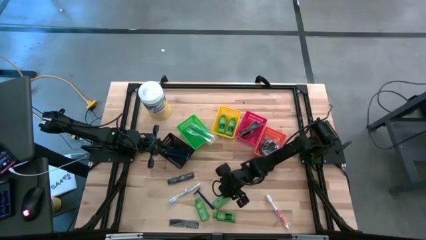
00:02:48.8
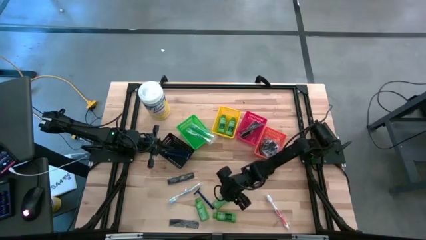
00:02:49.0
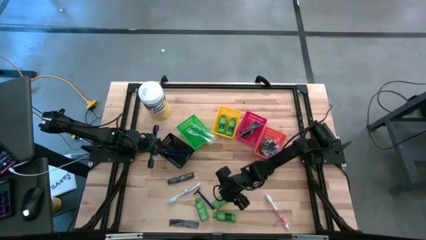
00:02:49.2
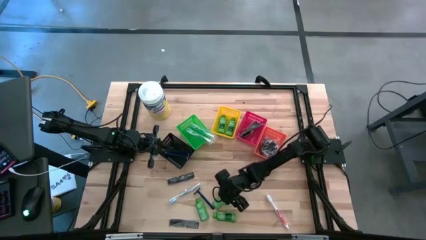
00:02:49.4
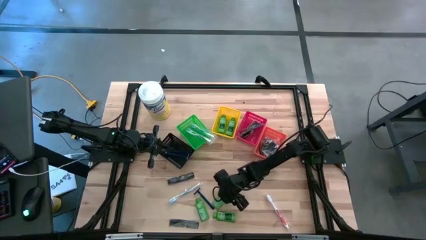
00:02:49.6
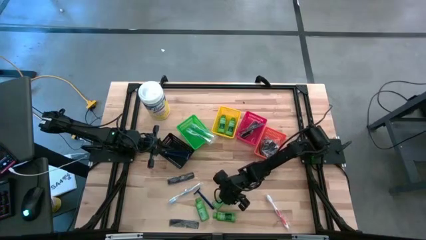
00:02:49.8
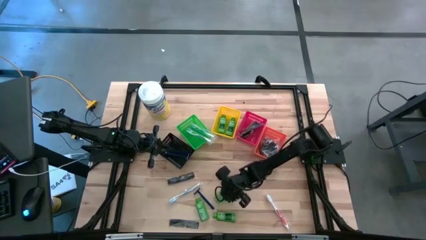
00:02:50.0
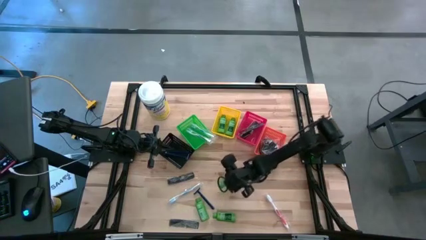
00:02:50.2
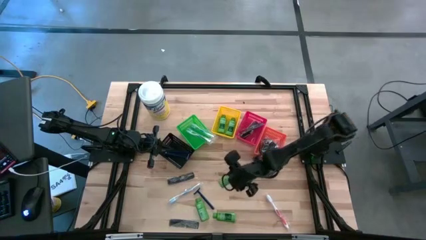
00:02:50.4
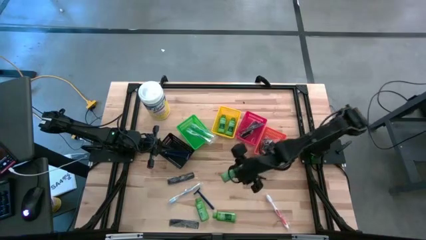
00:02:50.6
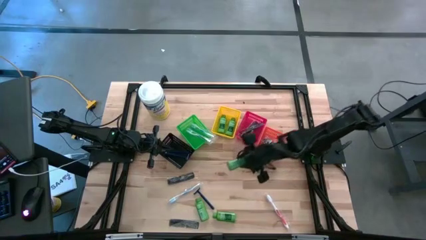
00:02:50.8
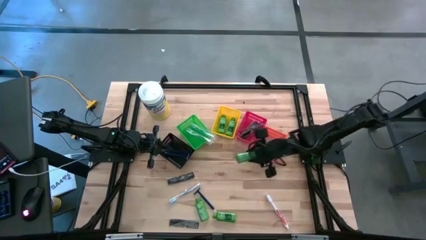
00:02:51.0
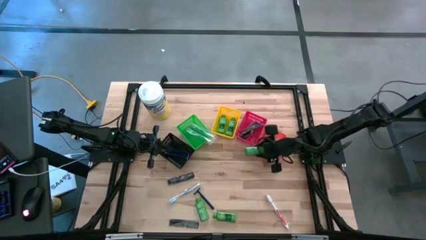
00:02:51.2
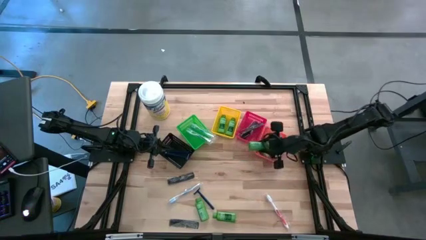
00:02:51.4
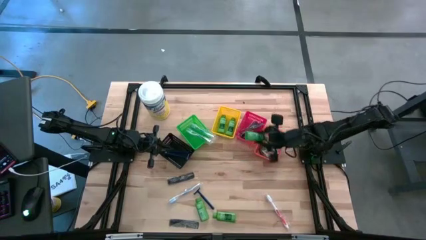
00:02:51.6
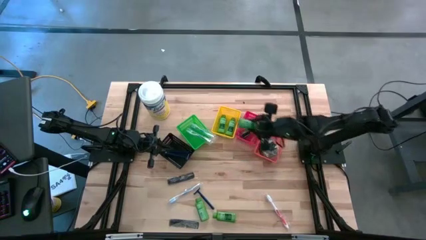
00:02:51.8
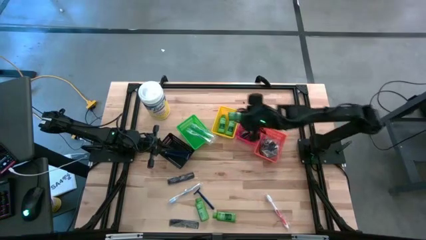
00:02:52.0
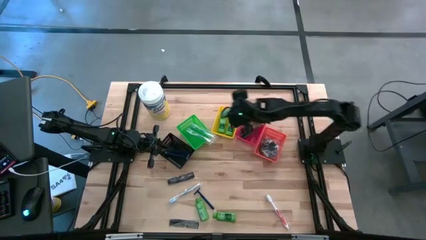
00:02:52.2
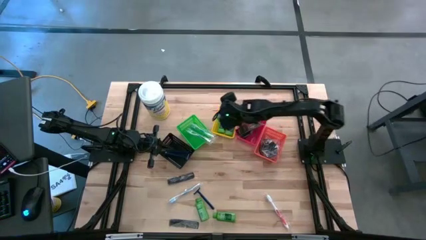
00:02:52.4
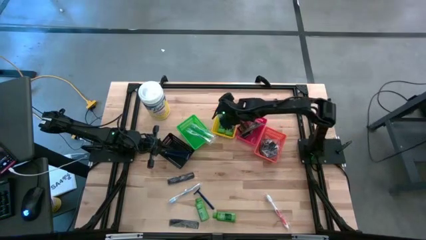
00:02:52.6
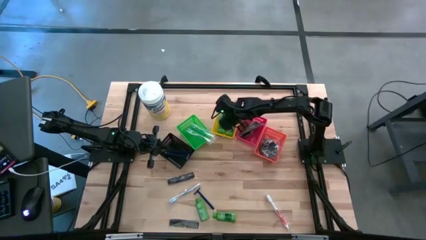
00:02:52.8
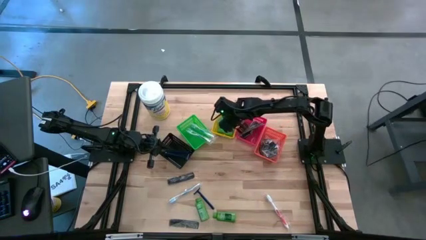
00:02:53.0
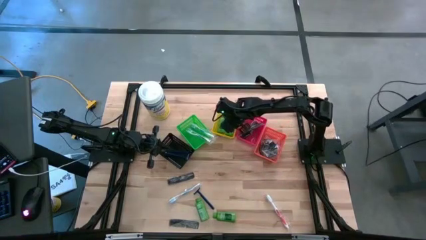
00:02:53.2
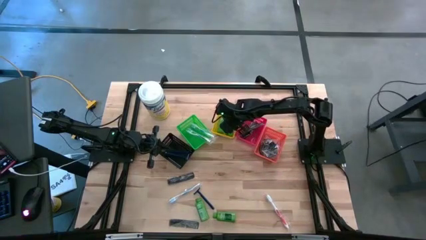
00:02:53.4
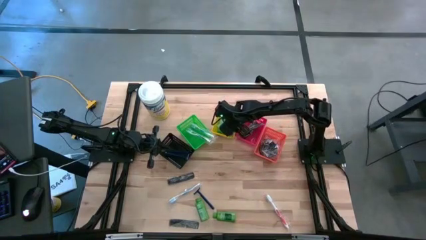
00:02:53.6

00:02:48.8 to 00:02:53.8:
Task: Pick & Place Travel size toiletries
Put the green shampoo into the yellow bin

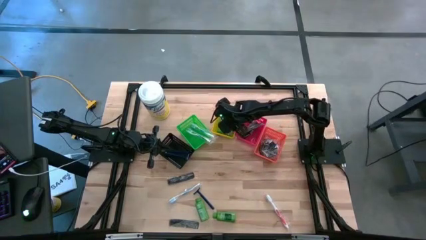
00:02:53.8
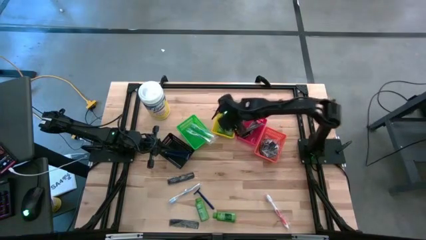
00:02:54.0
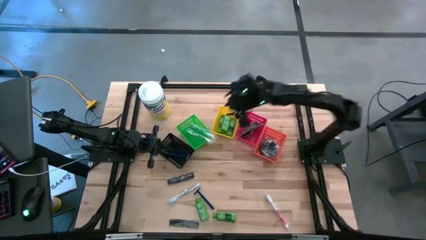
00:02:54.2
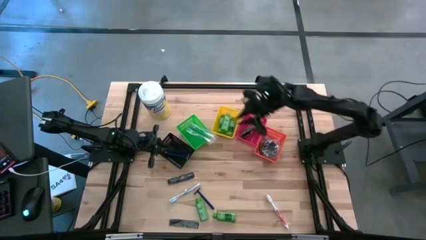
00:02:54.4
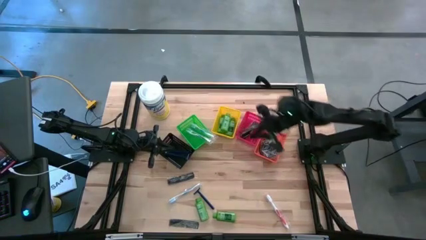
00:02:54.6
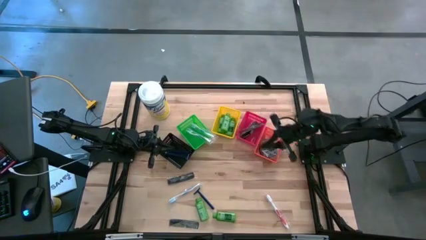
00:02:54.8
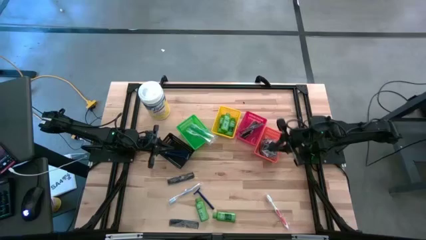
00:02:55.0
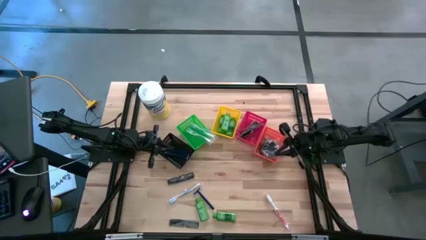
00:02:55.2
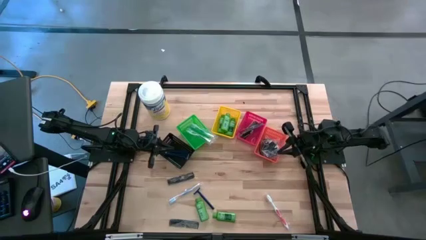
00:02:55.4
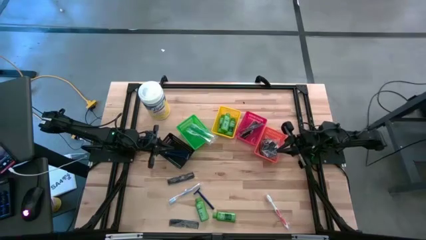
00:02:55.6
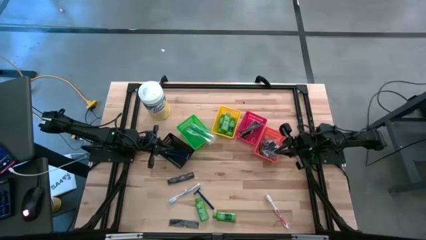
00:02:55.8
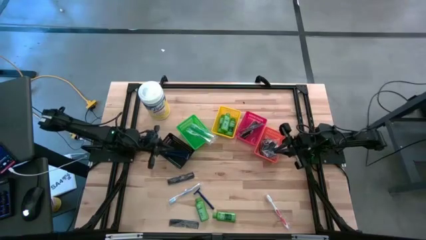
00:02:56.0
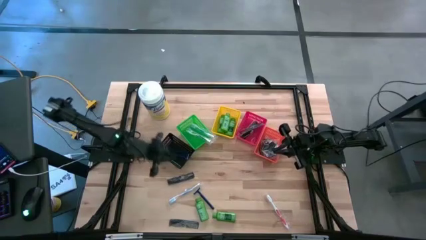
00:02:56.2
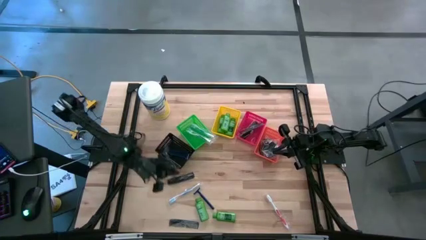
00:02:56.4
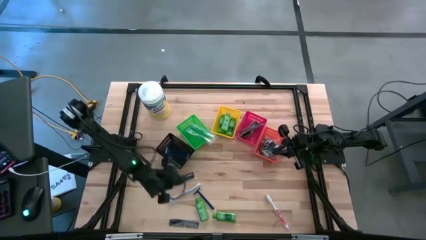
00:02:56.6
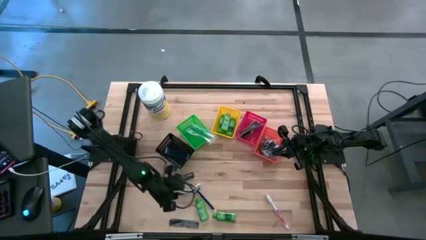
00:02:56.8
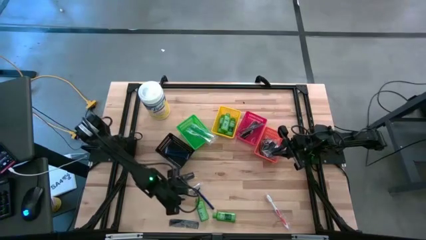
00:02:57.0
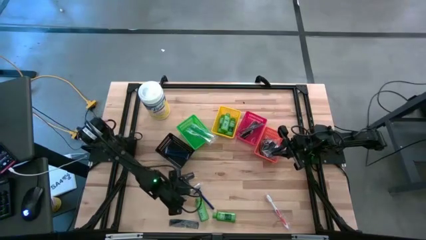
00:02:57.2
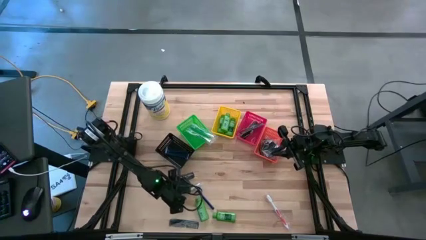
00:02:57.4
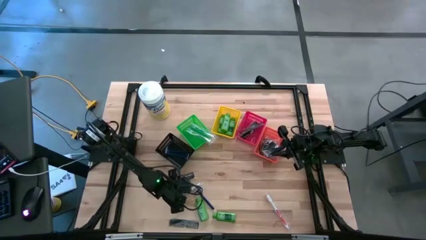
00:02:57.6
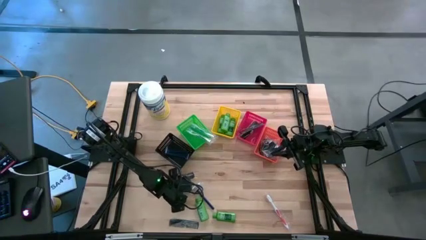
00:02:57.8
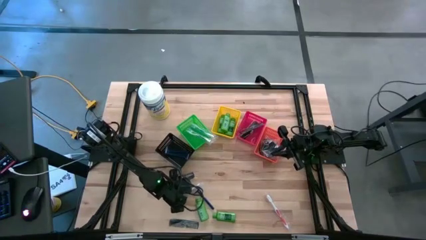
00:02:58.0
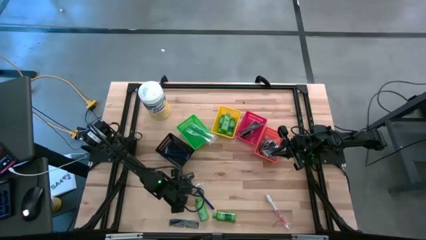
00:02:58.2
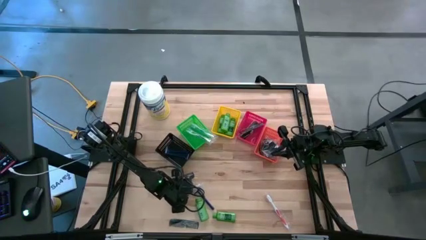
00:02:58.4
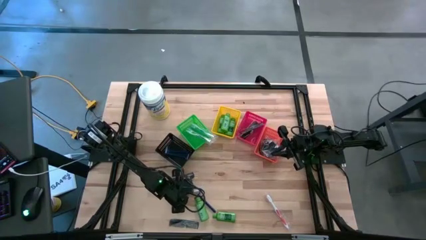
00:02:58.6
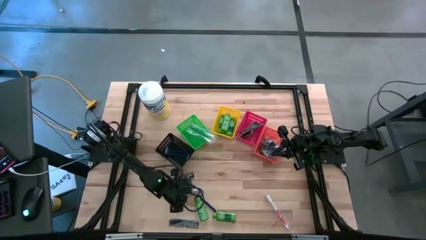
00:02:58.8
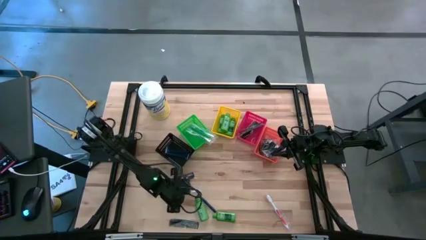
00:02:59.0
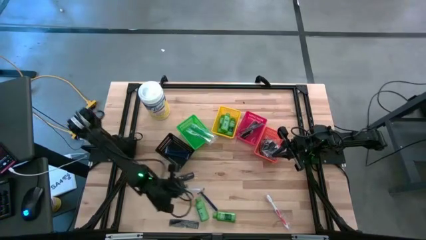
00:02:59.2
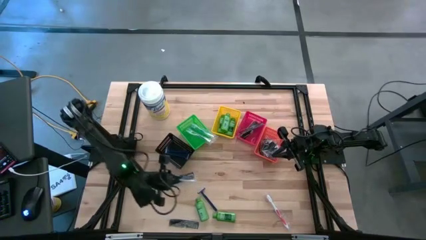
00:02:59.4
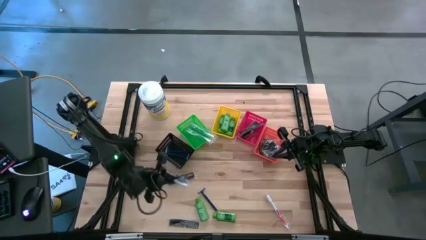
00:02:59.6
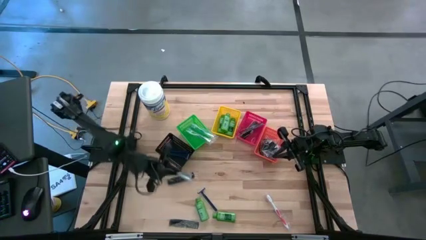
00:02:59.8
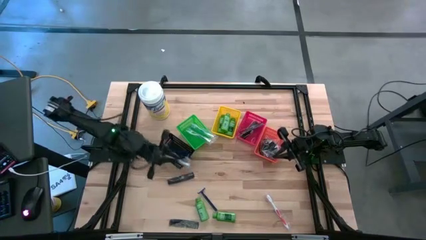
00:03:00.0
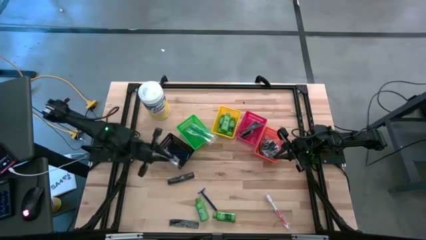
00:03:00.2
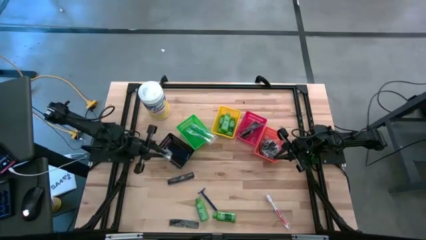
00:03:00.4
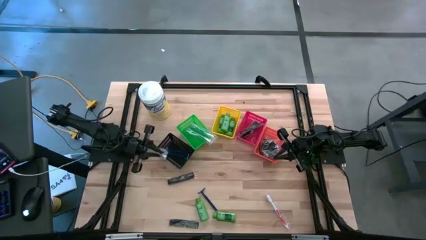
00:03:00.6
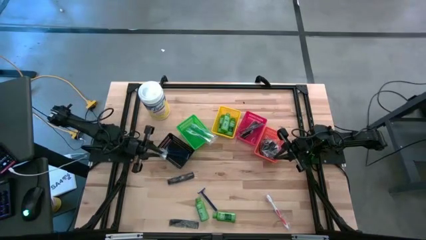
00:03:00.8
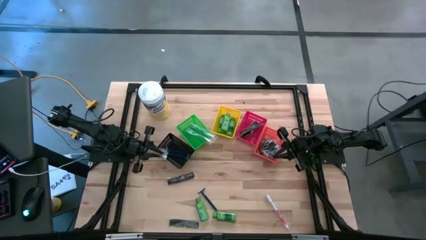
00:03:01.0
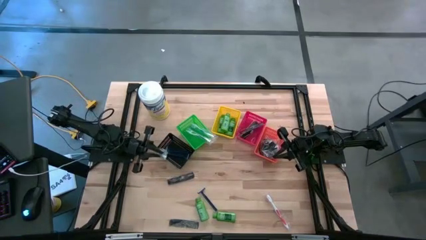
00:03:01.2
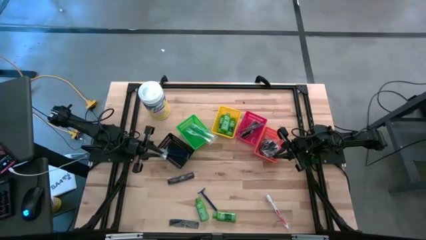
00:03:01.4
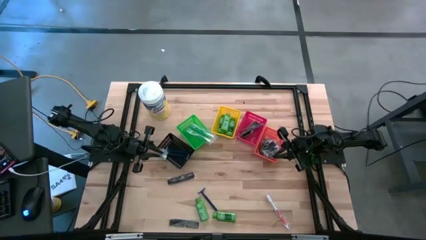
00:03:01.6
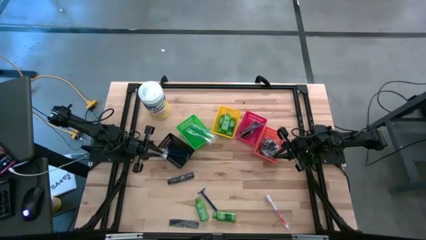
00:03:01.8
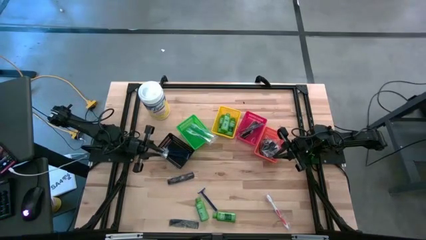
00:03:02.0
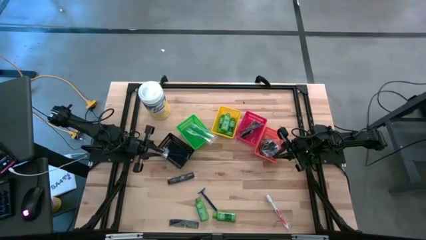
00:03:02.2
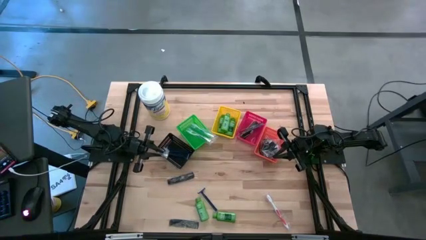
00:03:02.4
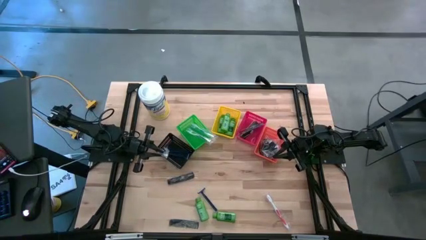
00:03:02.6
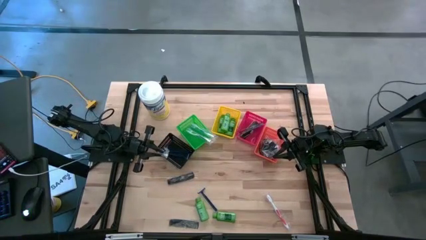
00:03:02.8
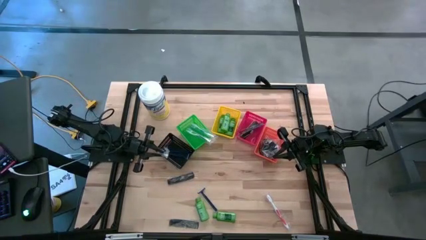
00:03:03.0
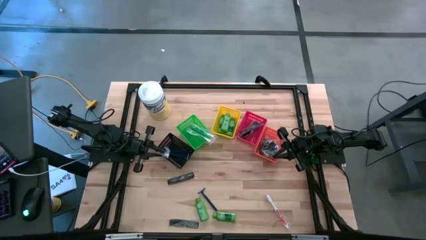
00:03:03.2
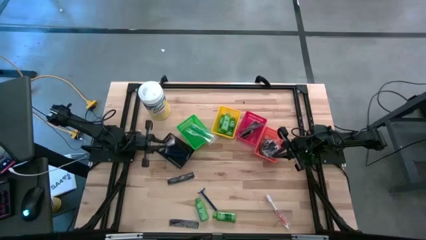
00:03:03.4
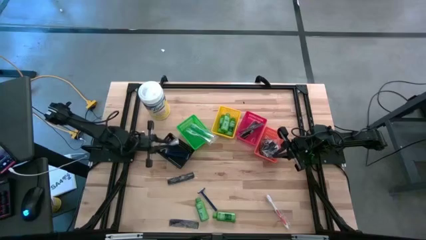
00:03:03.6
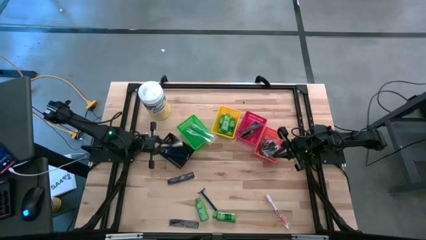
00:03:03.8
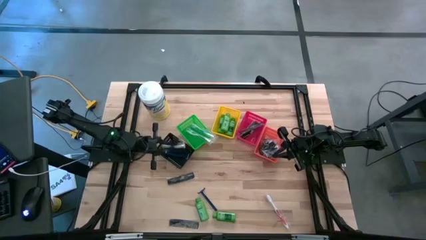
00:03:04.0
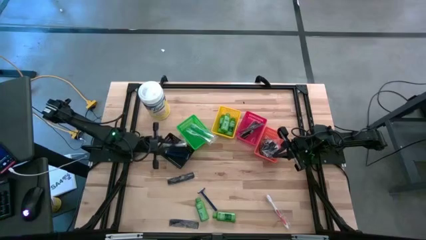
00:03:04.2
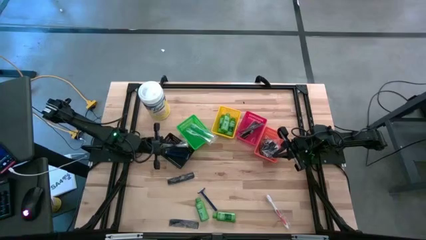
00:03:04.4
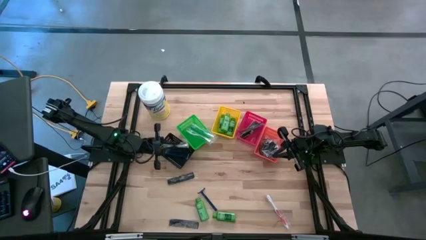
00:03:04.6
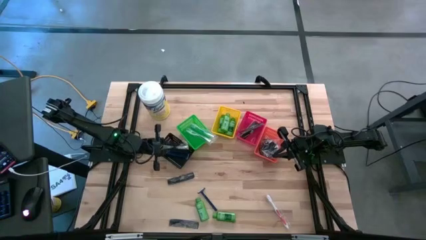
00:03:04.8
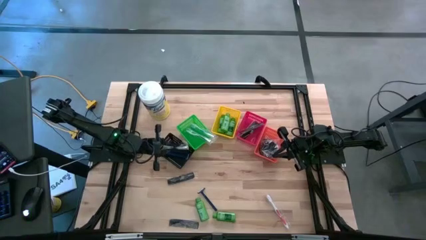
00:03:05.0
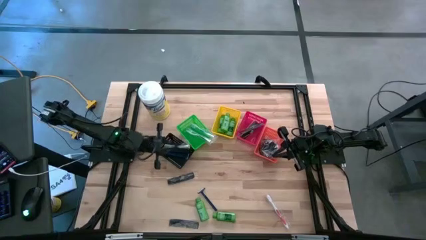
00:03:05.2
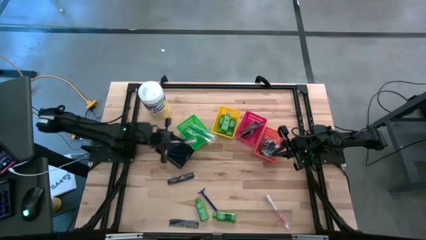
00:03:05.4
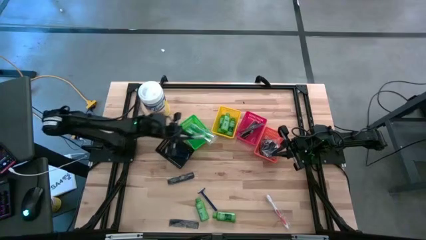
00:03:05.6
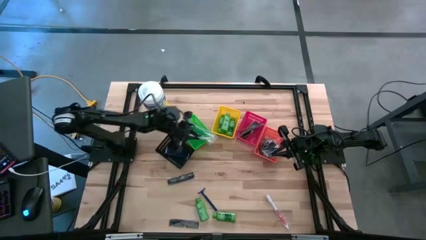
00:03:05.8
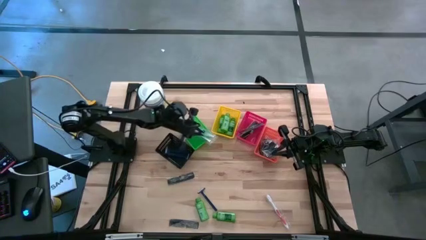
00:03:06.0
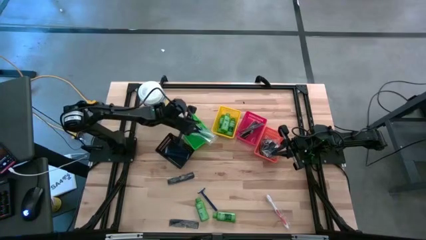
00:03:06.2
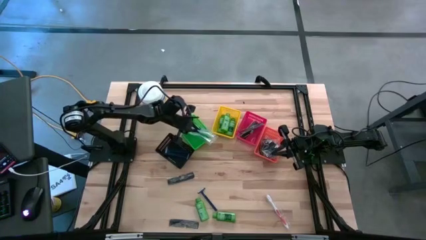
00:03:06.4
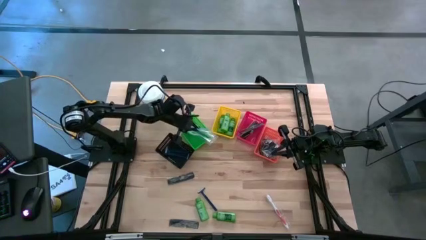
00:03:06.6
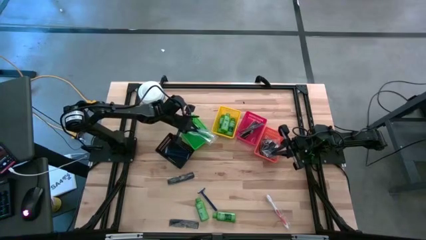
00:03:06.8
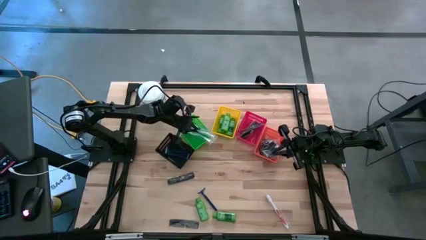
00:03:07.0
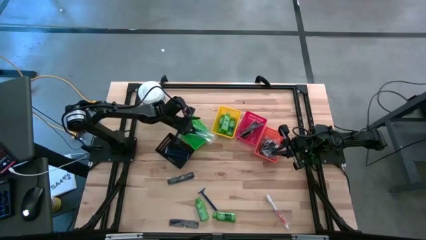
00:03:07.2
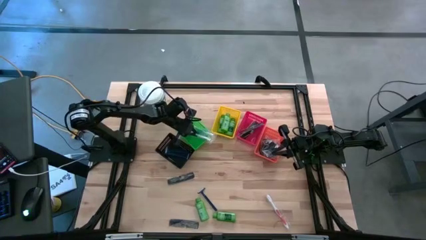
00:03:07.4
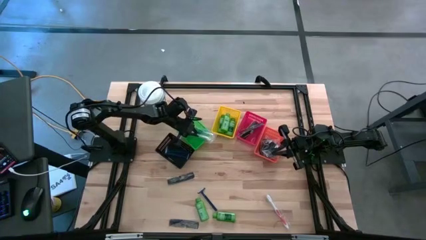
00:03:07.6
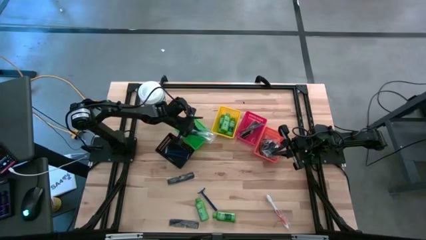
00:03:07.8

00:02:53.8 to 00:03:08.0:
Put the blue toothbrush into the green bin
